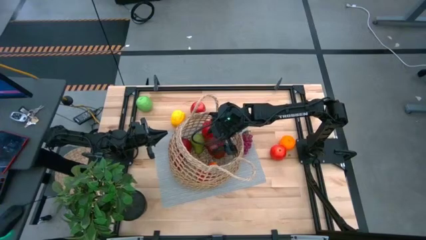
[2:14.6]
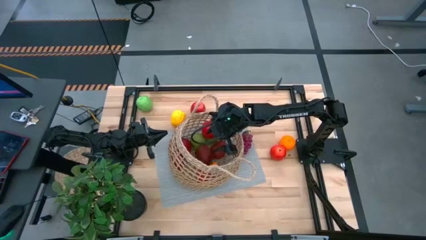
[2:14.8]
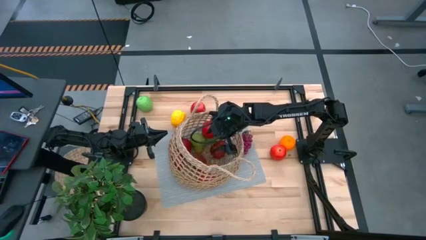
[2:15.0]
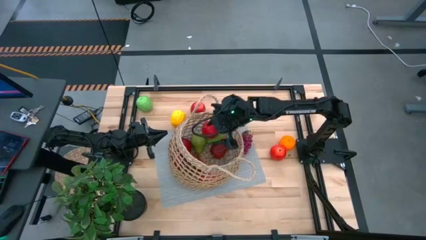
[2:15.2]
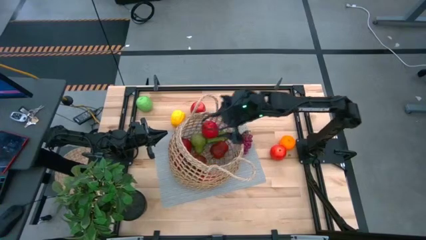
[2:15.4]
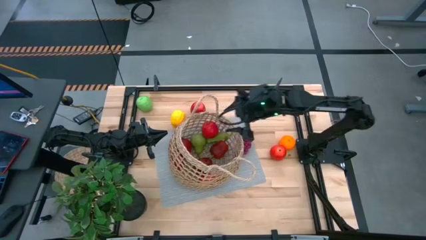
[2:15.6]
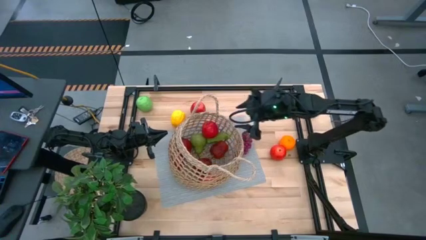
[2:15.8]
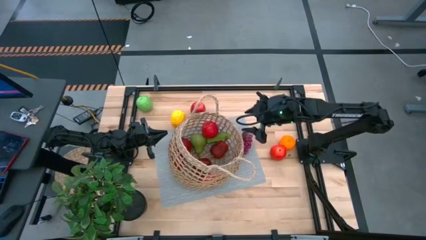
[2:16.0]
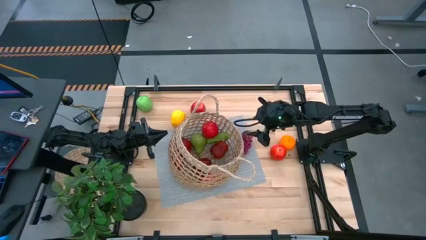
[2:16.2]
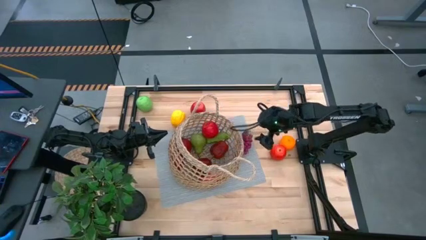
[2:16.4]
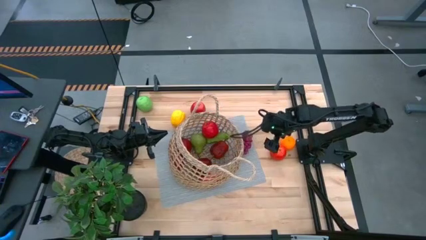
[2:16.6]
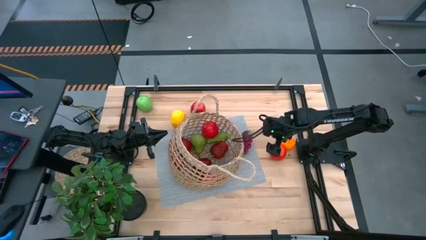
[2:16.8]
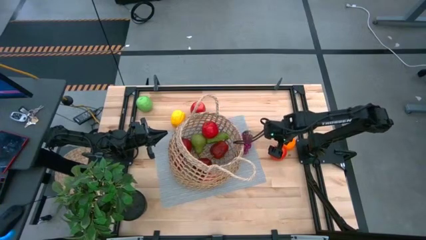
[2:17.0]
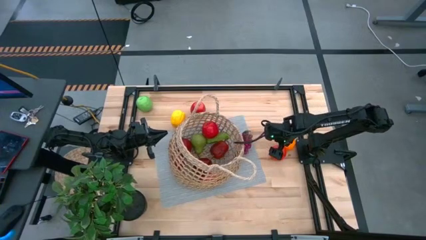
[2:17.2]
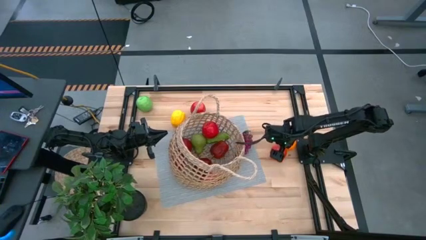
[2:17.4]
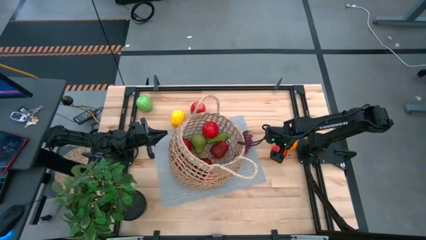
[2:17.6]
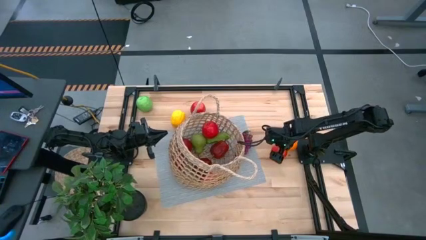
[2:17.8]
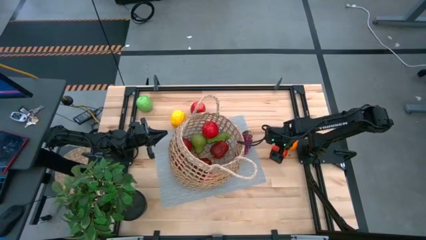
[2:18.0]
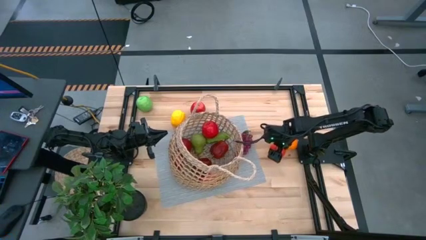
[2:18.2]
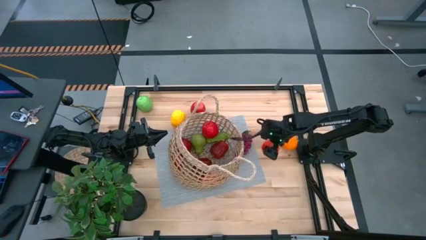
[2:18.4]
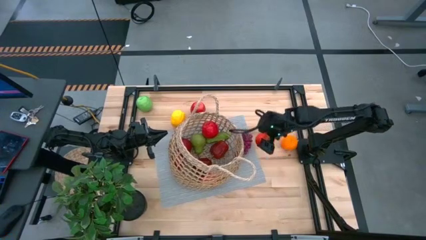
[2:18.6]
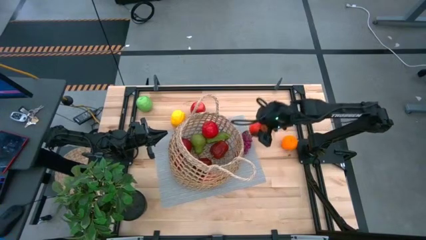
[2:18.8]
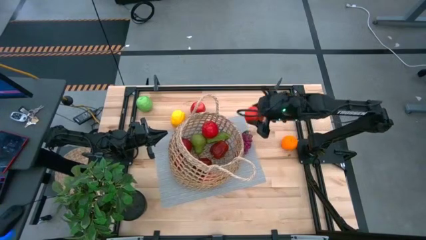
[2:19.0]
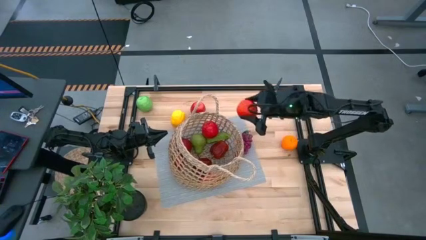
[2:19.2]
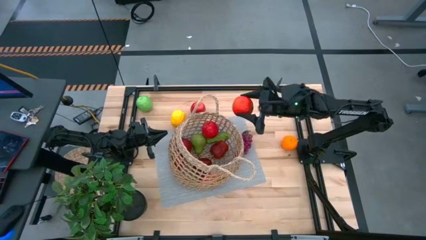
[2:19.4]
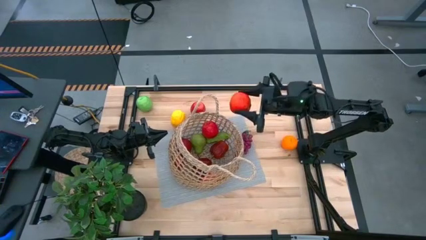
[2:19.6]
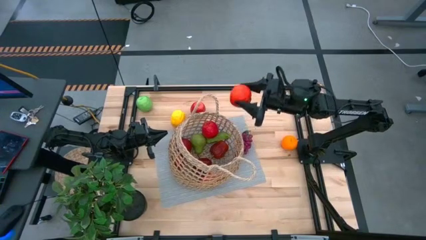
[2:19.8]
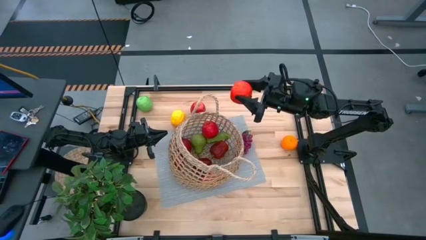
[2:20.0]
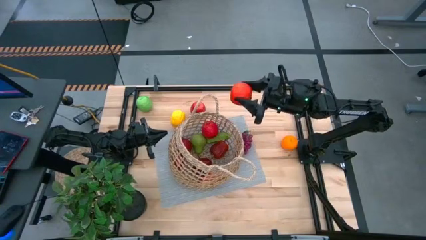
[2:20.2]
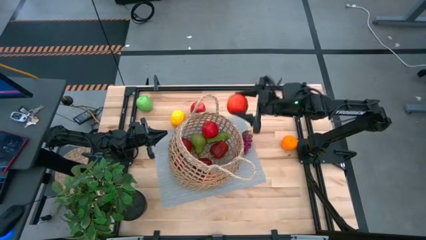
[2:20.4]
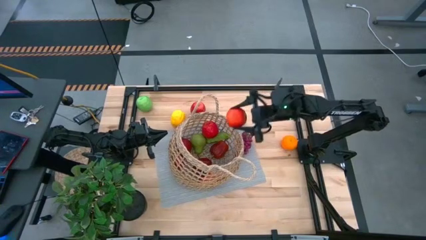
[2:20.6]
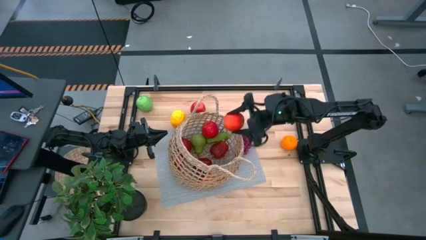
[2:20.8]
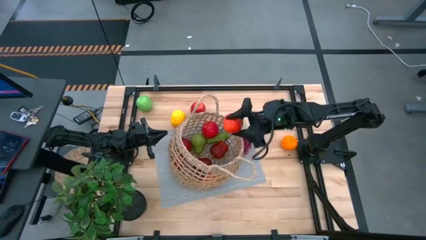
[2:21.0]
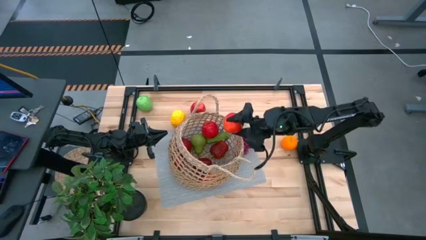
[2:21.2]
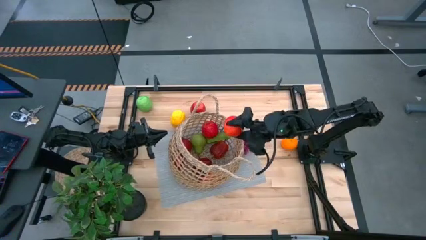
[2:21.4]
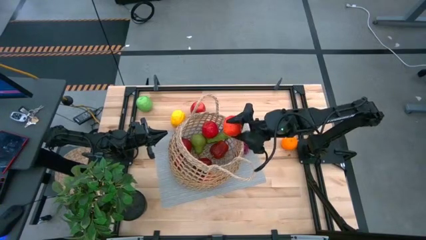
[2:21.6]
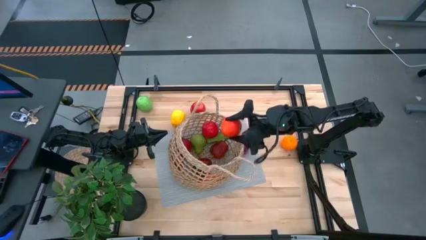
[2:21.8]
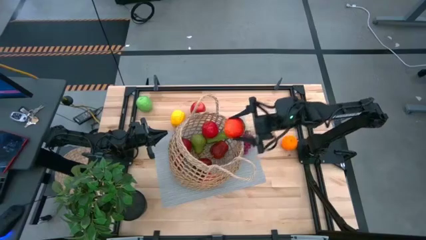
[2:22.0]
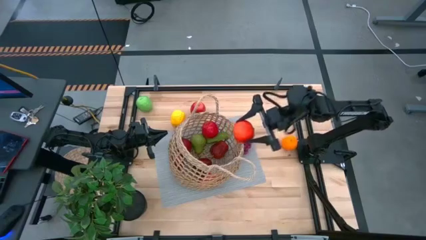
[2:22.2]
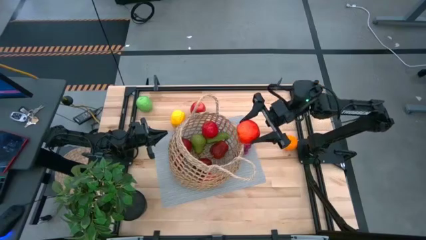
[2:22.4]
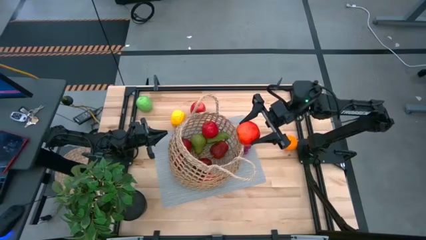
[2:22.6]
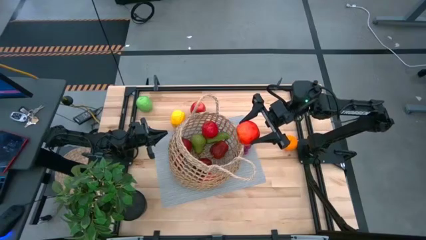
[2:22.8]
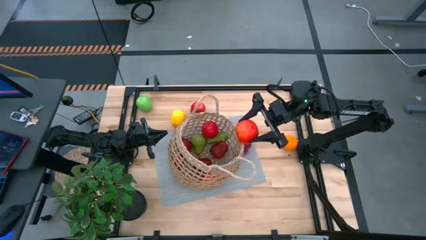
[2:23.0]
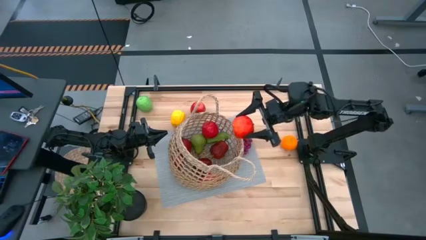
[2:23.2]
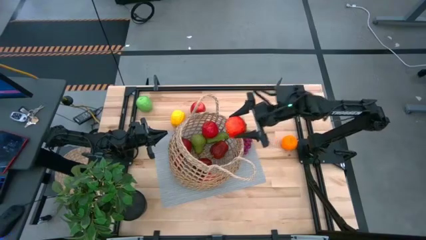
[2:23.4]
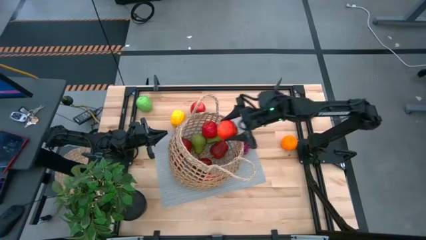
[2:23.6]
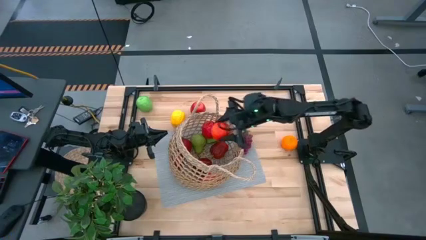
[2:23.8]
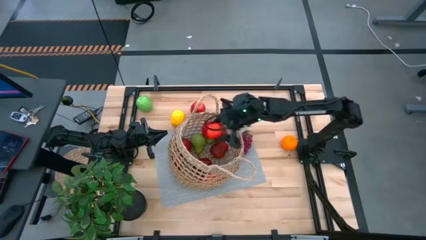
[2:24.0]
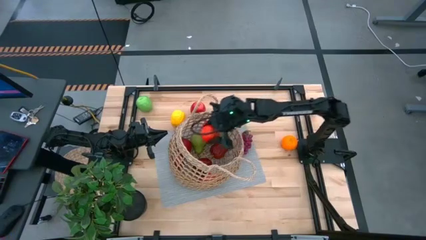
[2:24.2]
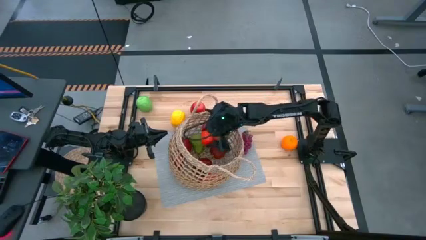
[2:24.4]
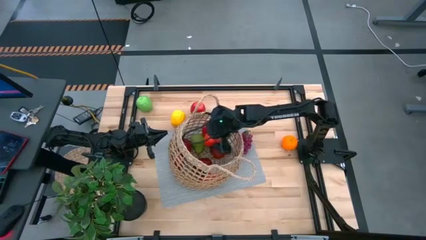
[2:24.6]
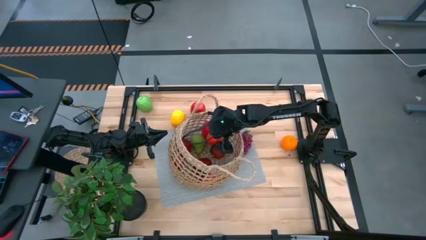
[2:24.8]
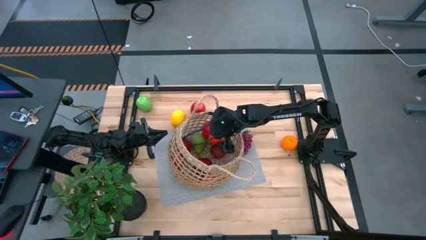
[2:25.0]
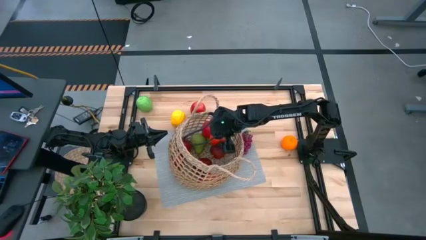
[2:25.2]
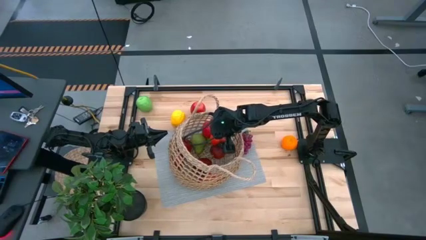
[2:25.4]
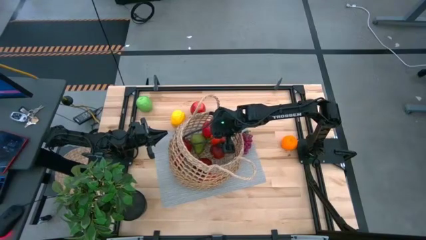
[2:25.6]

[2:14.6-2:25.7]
Task: Build produce basket
Put the red apple into the basket

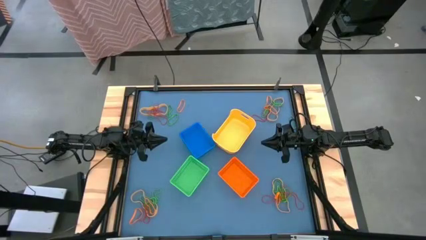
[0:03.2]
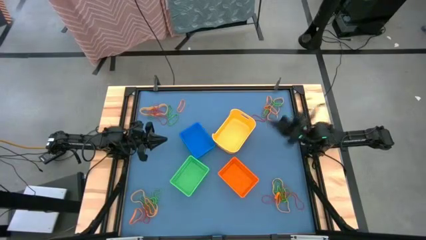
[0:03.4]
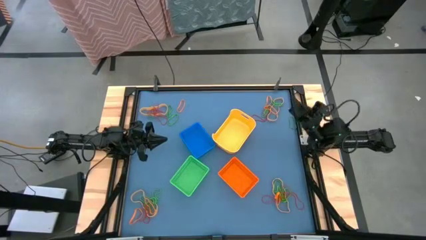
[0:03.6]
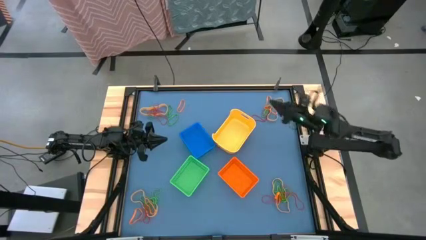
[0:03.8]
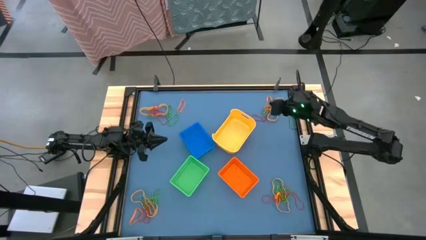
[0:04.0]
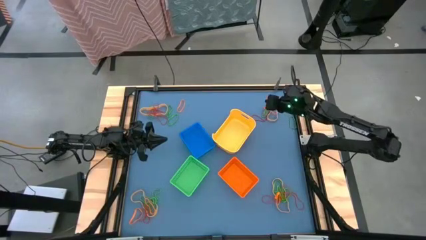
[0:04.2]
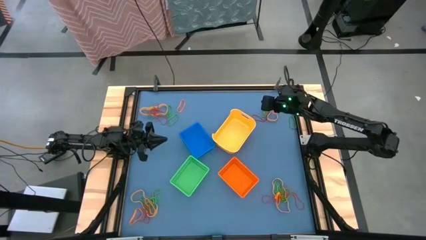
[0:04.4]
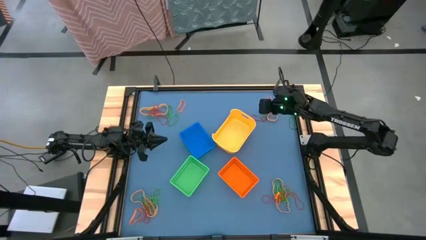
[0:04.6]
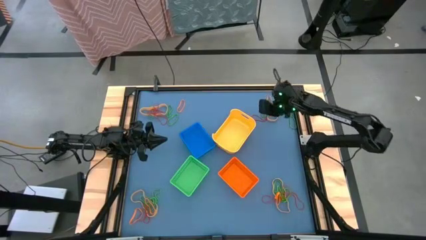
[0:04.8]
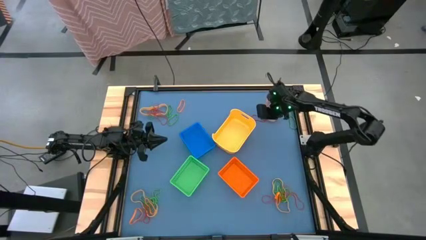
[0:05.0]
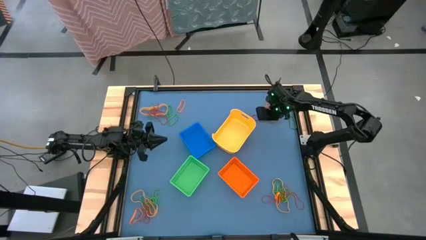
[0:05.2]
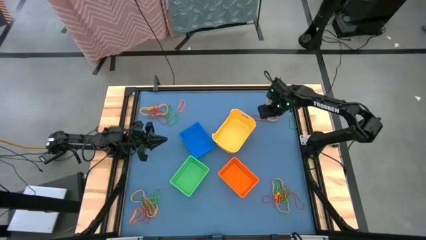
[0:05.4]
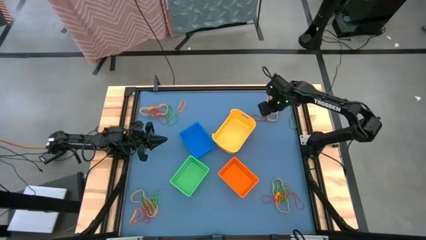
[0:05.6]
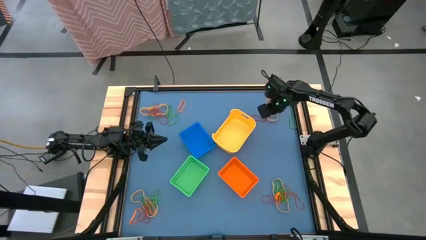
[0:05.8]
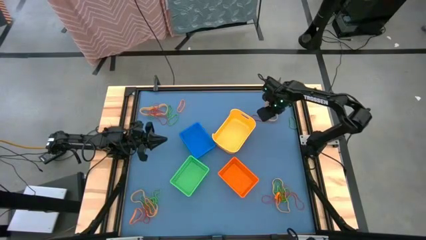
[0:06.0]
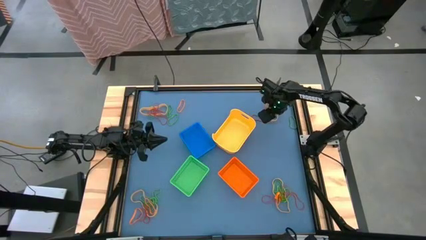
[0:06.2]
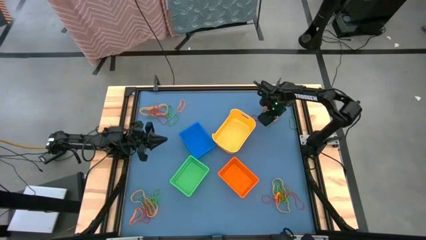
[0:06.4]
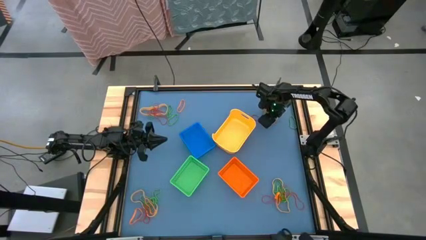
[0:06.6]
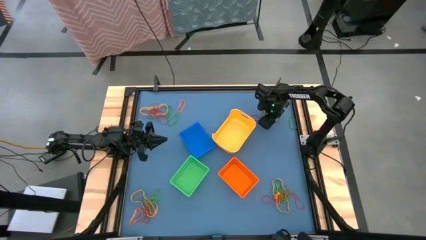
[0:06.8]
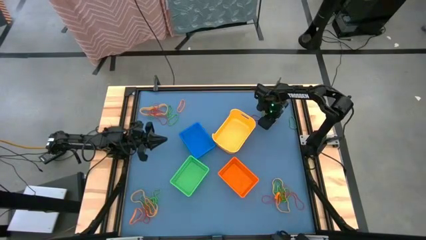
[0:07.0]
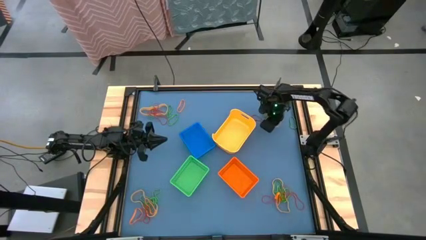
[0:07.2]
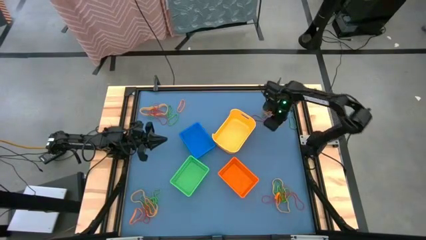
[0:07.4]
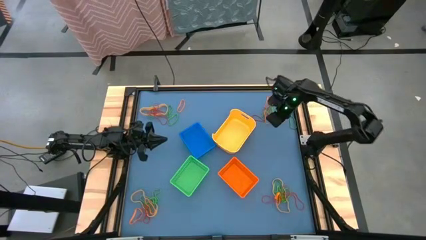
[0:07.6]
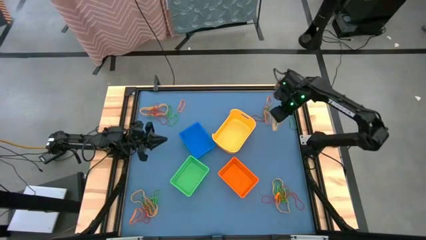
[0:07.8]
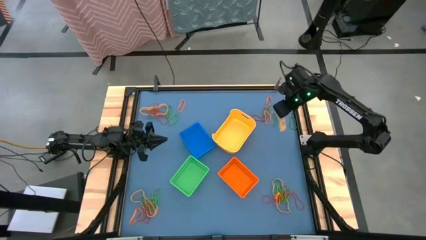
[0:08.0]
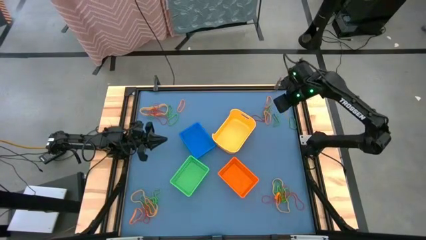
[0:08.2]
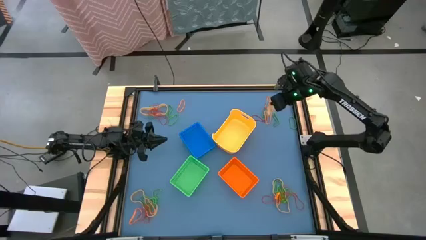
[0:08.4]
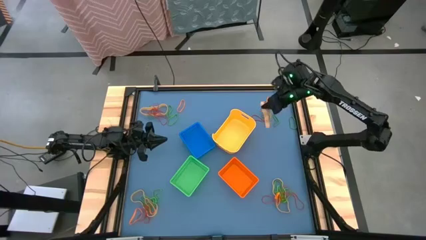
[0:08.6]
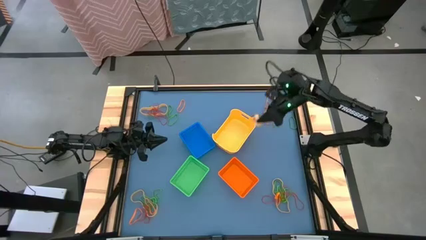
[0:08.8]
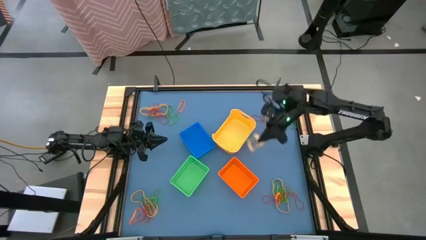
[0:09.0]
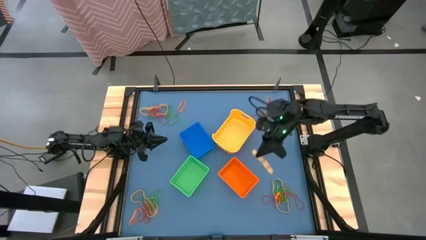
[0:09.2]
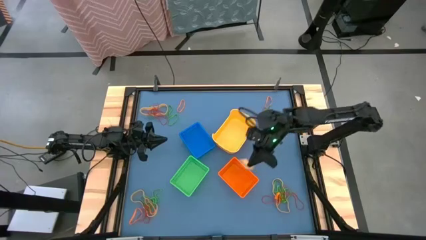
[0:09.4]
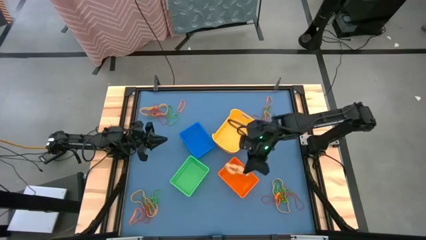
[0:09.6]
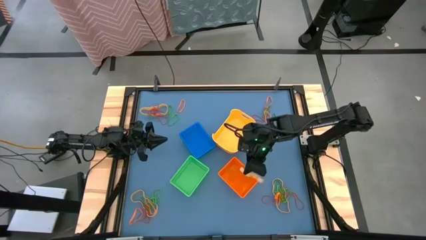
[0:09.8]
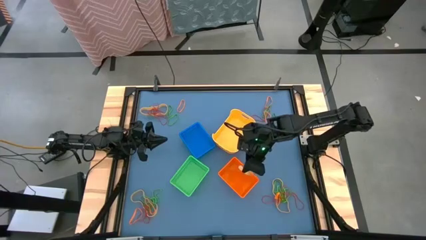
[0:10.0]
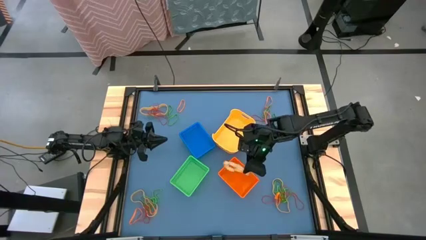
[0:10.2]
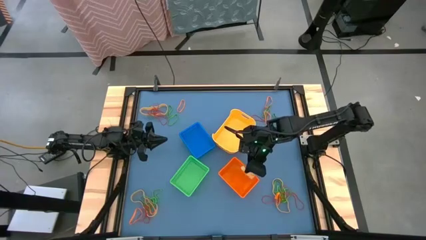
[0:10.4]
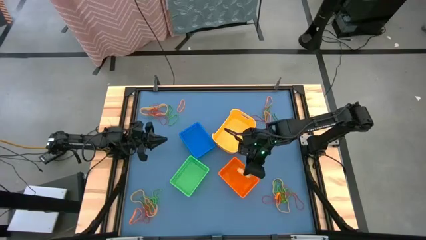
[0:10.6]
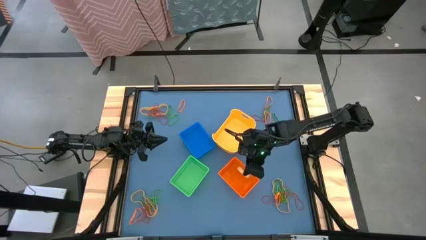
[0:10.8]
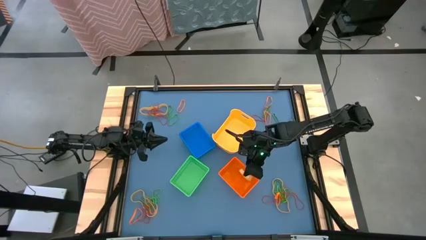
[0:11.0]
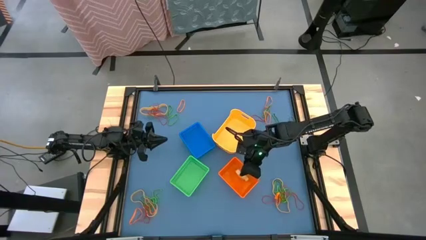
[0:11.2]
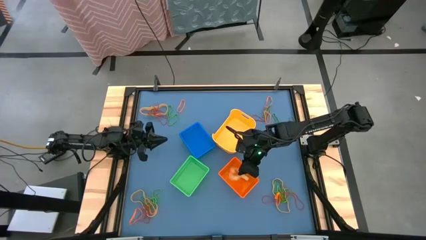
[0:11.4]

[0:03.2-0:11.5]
Task: Sort rubber bands into baskets
Put the yellow rubber band into the orange bin
